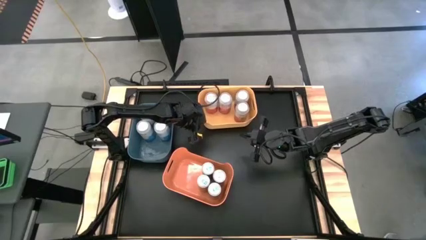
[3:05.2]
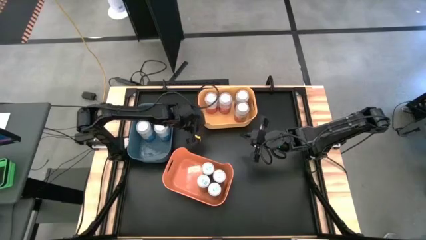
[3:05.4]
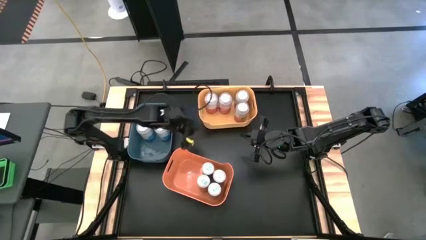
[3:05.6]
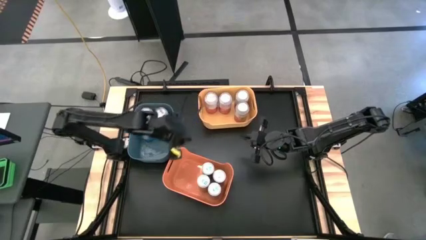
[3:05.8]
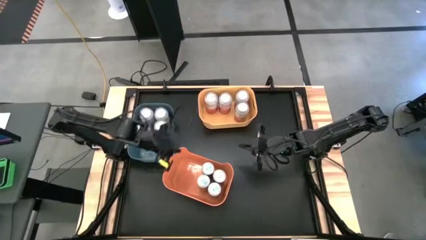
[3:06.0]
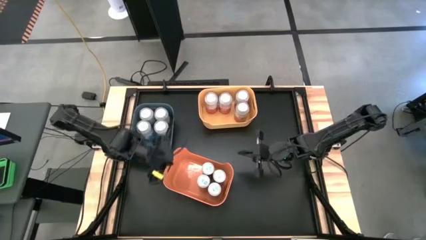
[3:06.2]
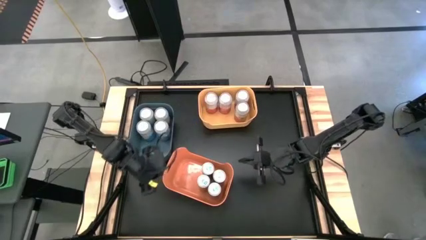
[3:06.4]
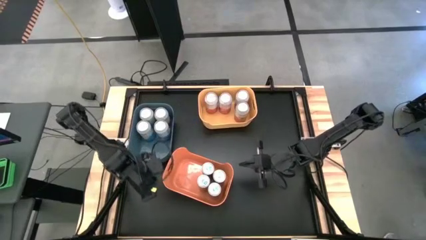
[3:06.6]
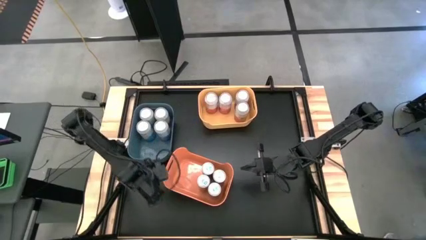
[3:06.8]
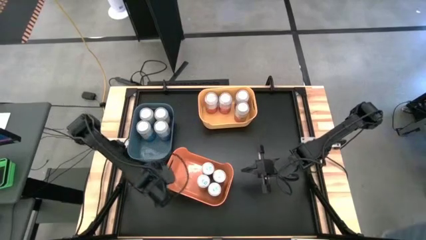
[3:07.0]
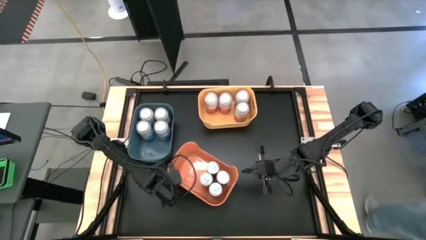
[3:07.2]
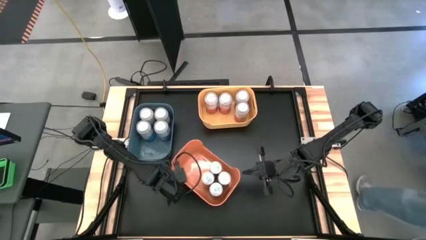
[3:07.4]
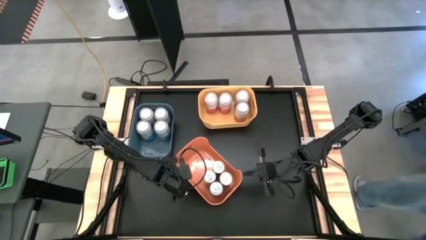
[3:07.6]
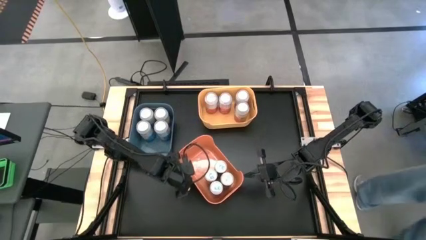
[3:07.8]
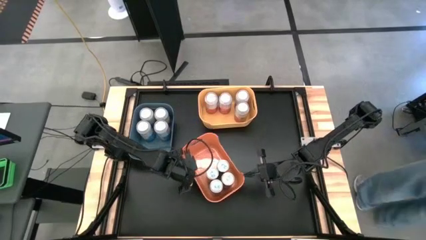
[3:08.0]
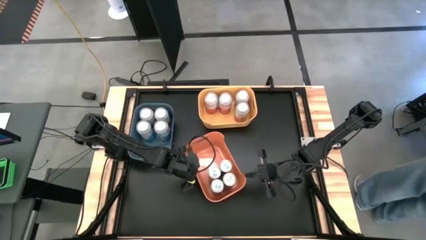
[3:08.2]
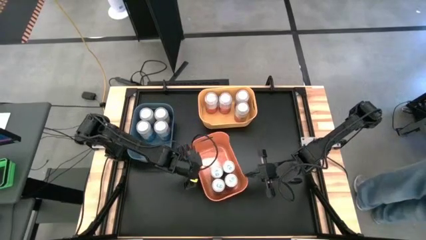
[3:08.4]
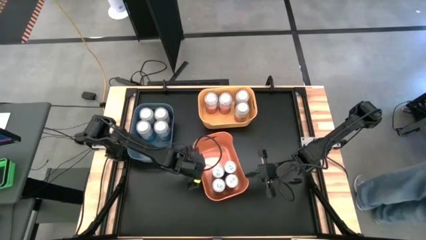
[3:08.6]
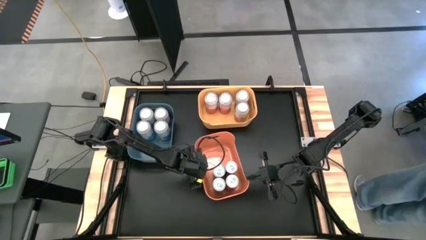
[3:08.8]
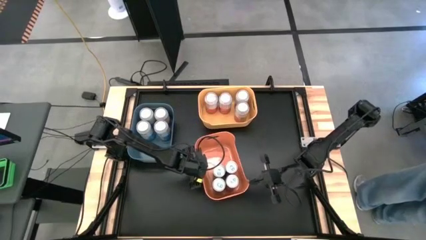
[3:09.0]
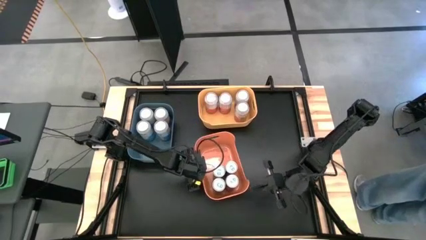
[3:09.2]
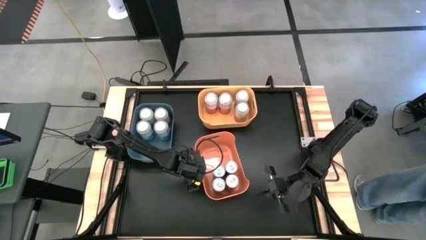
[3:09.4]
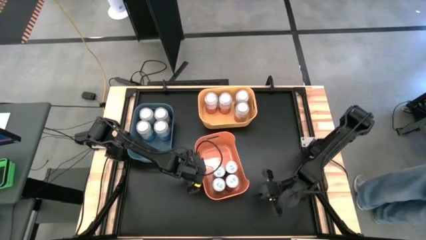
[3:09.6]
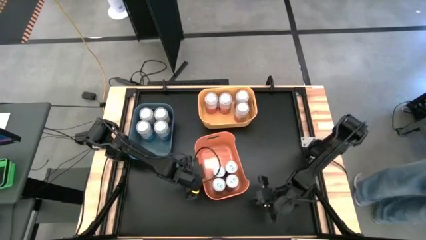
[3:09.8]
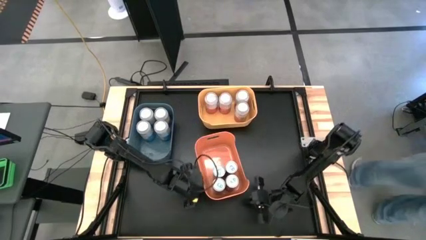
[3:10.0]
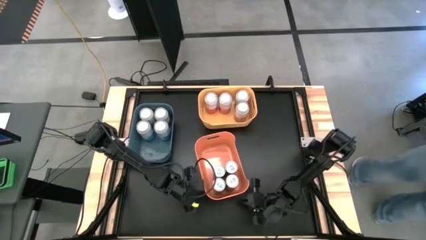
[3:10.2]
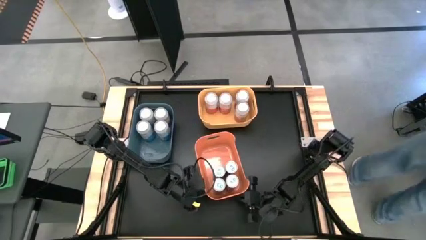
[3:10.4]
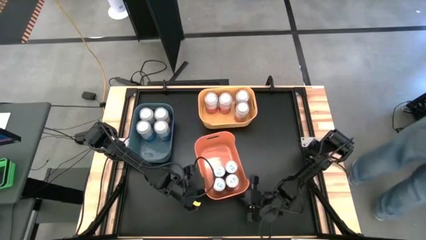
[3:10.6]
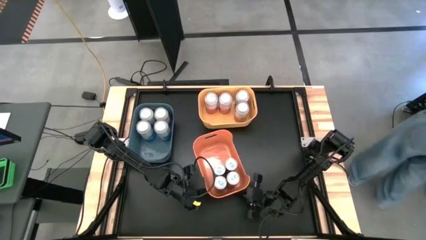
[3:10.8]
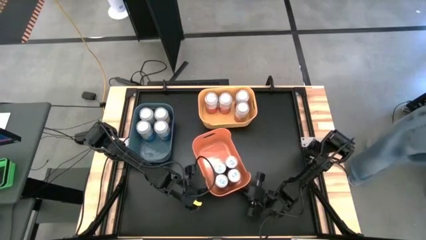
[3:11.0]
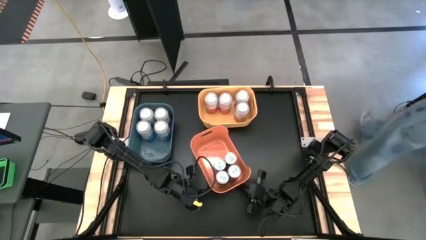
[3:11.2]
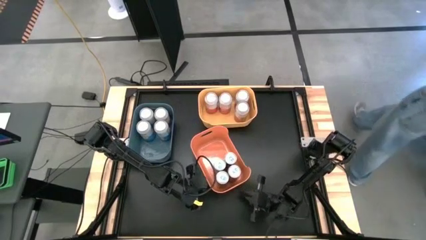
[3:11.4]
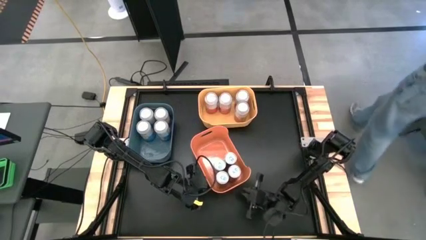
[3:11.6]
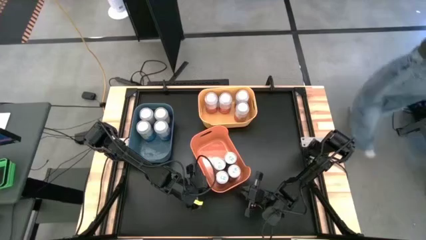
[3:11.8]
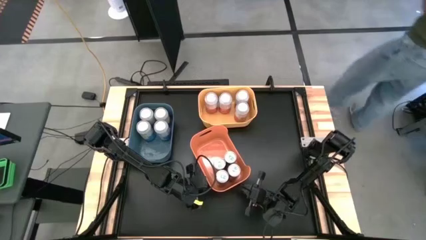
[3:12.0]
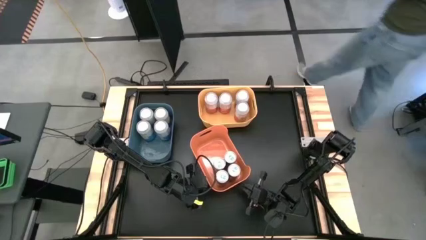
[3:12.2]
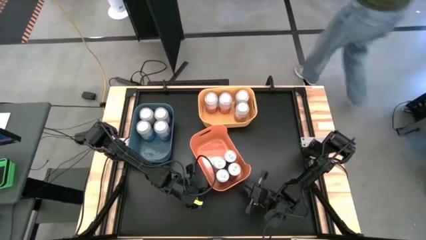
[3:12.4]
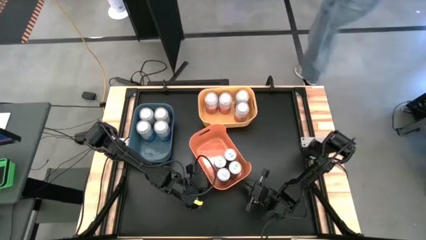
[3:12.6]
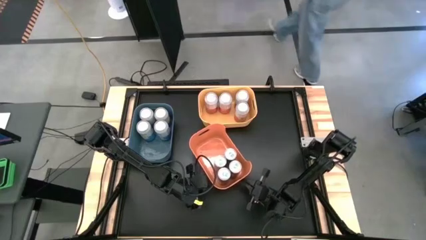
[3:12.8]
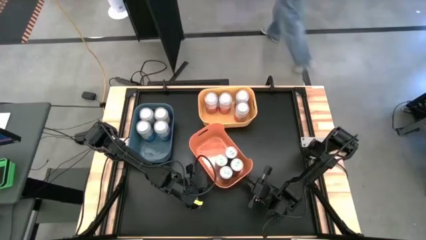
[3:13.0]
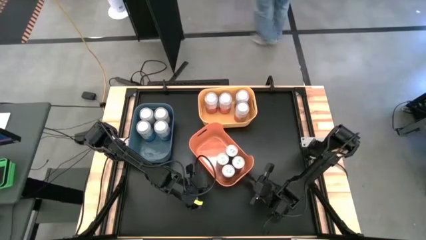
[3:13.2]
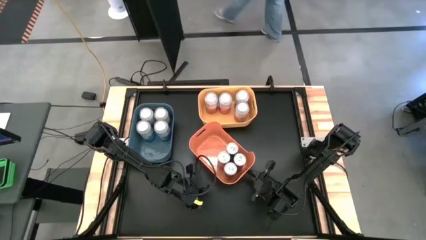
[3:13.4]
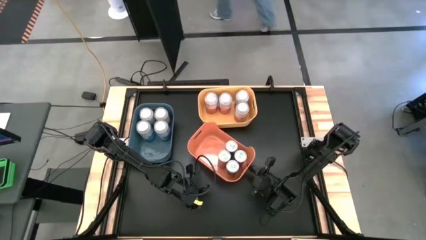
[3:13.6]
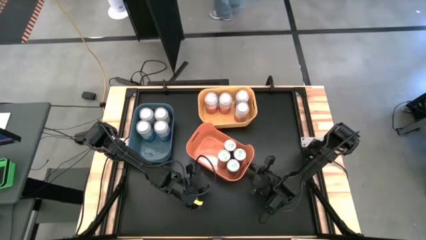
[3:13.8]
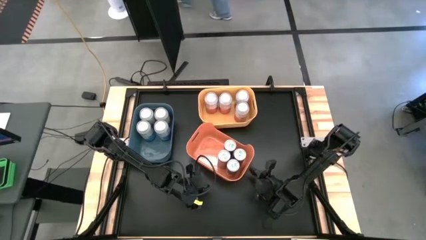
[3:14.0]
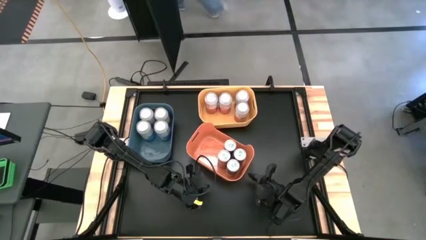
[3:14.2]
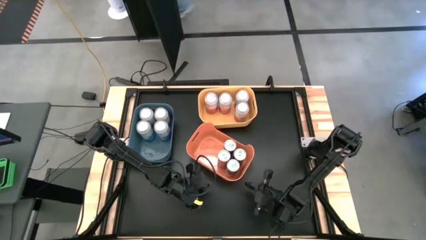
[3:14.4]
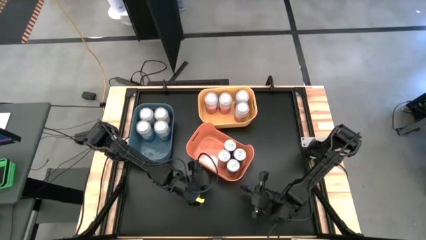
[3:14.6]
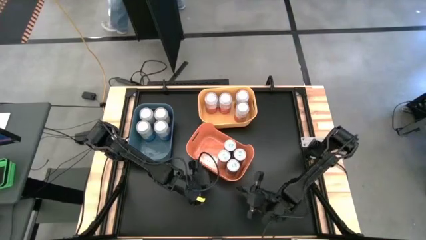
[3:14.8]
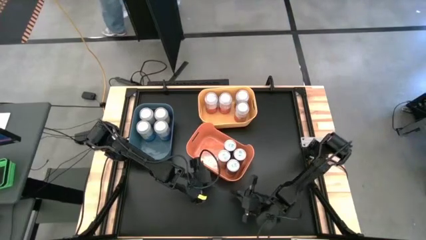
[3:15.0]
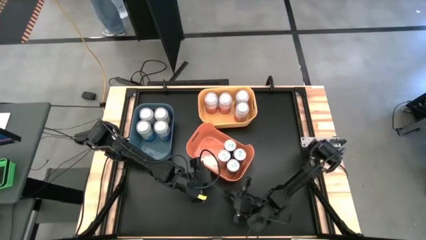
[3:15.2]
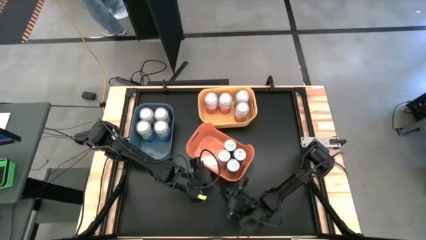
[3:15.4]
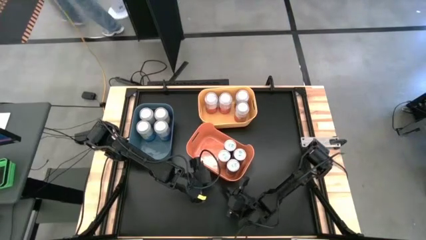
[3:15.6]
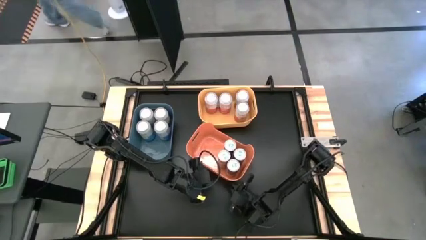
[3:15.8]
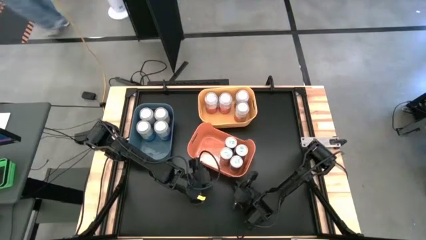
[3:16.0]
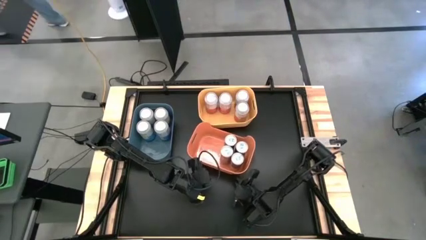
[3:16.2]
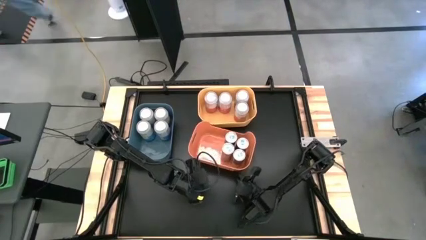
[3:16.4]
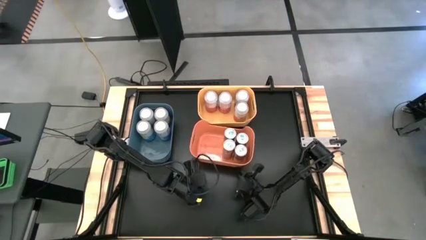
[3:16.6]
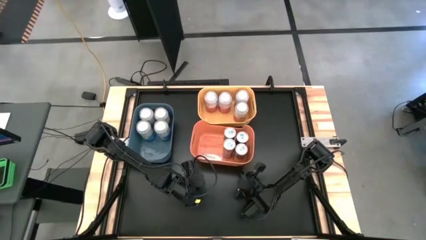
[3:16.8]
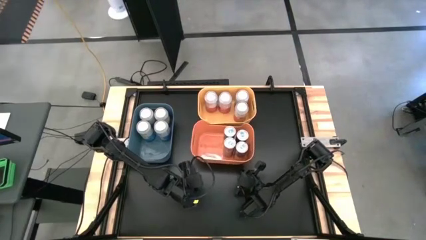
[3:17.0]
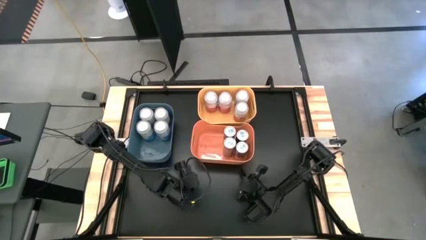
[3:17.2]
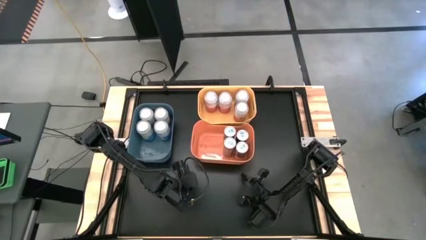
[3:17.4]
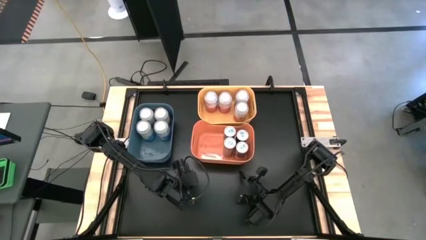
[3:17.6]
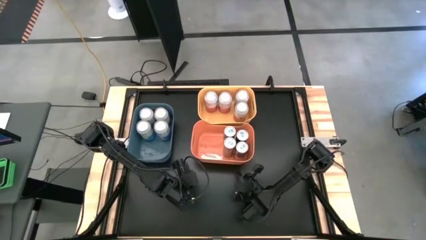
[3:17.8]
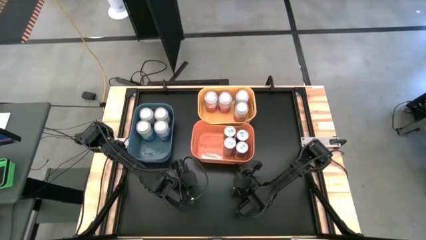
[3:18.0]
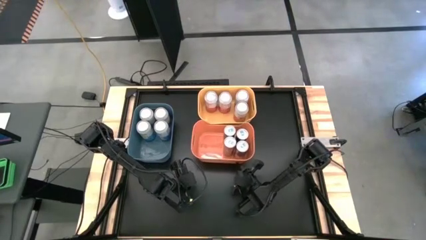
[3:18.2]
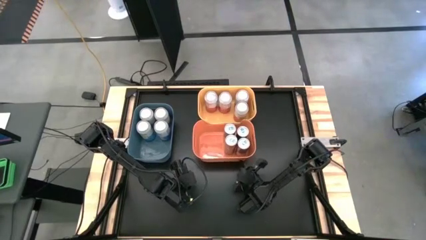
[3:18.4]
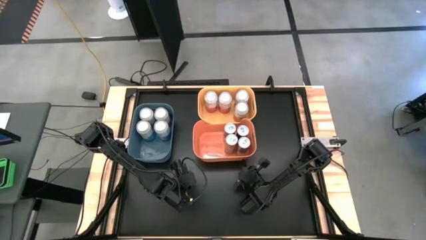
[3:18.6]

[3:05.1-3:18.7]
Task: Sort soda cans
Move the orange bin

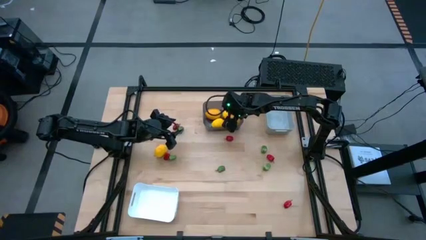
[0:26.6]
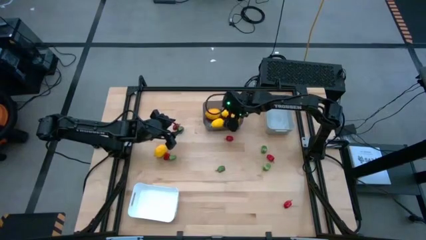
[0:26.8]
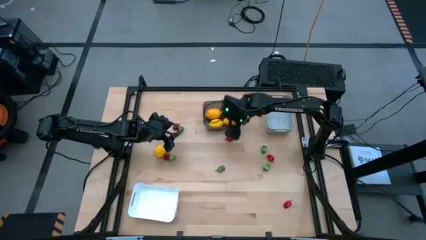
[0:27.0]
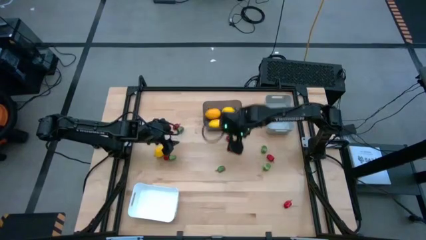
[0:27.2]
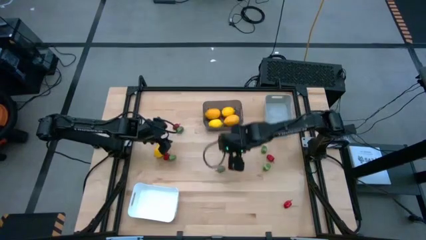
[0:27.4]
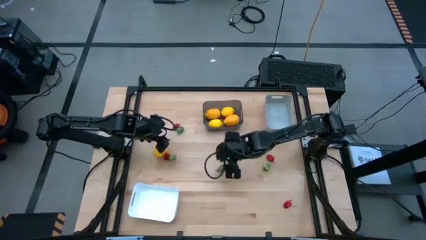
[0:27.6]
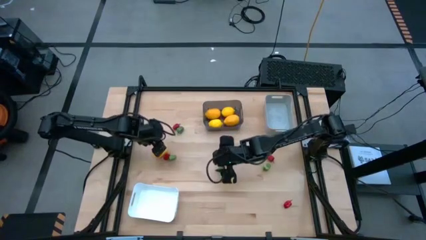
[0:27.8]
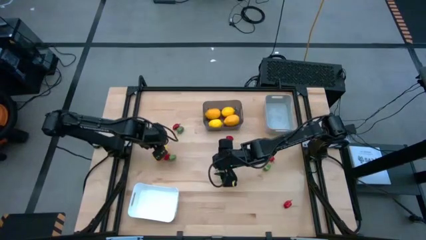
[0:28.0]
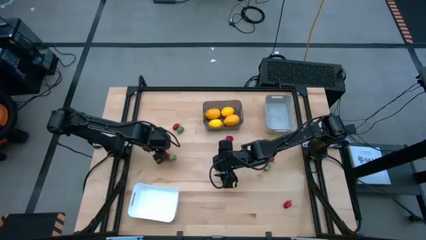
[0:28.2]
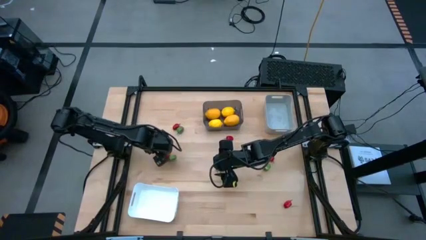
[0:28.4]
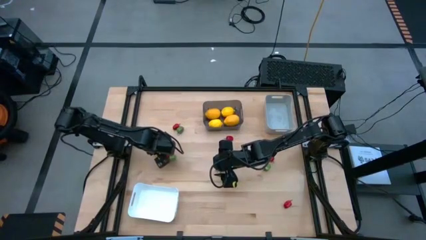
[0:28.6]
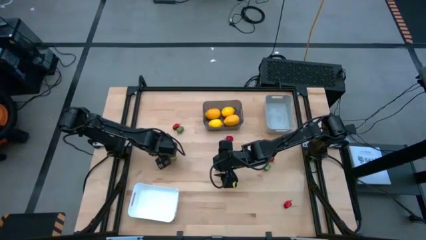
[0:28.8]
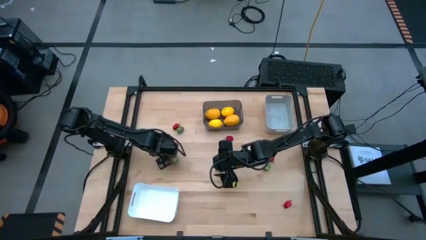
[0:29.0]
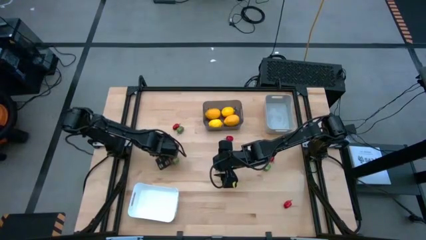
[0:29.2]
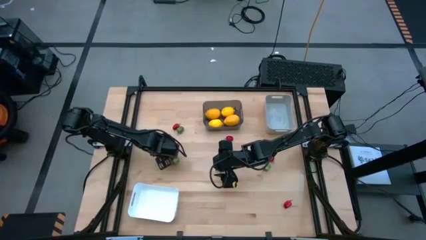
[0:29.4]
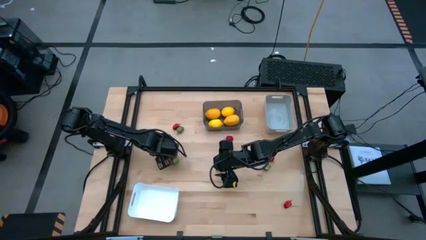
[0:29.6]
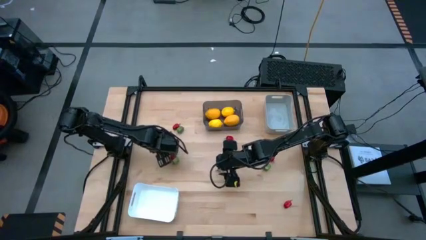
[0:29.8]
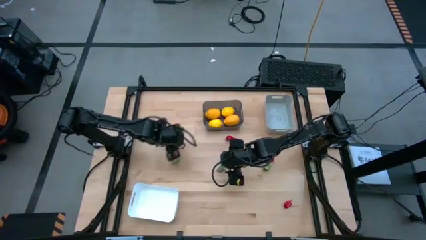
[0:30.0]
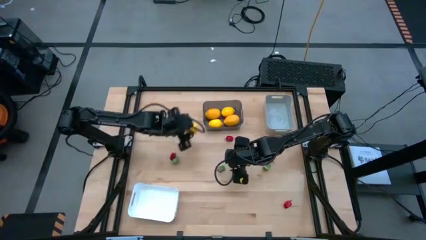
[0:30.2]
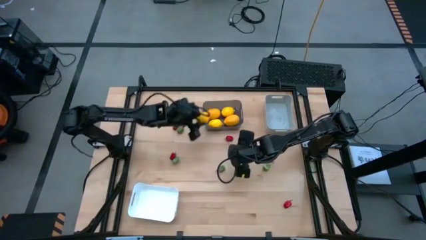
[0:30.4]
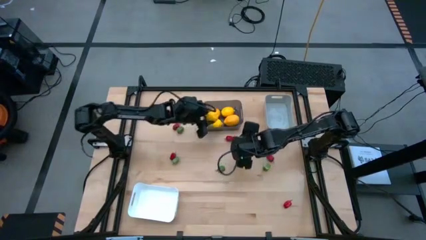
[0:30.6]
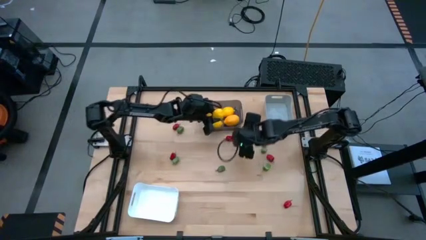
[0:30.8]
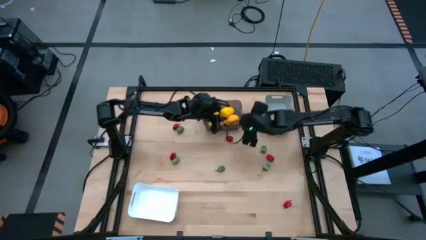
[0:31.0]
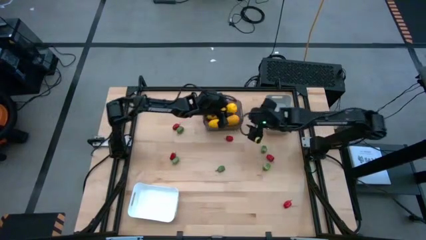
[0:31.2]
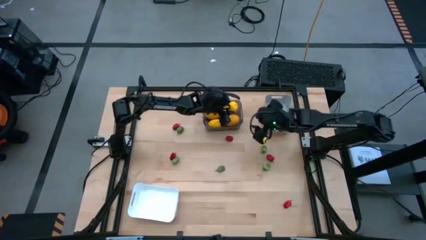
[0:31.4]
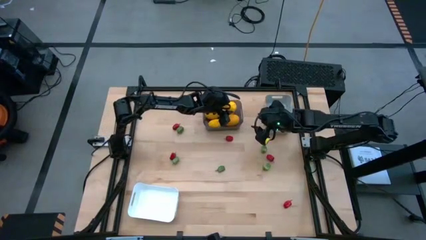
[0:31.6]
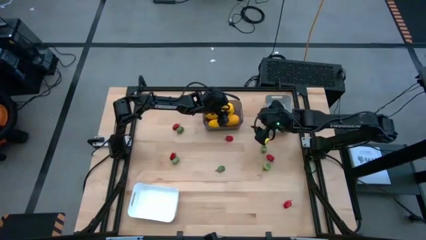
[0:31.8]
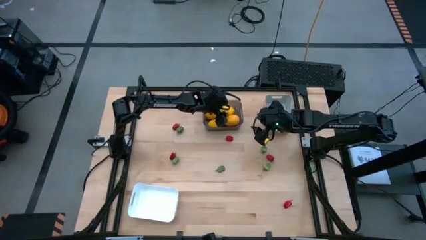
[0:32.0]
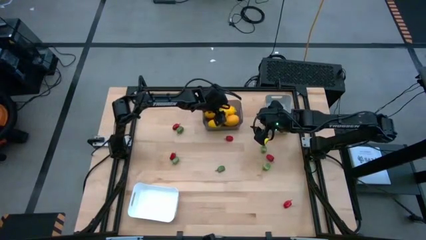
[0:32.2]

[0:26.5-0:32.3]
Task: Sort produce into baskets
Put the lemon into the black bin
